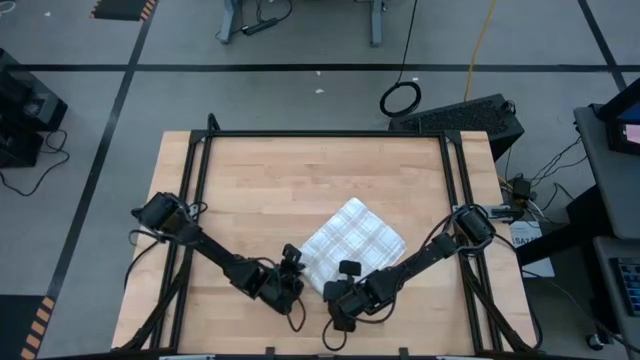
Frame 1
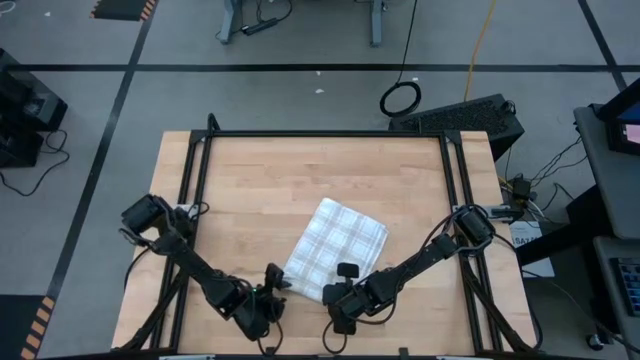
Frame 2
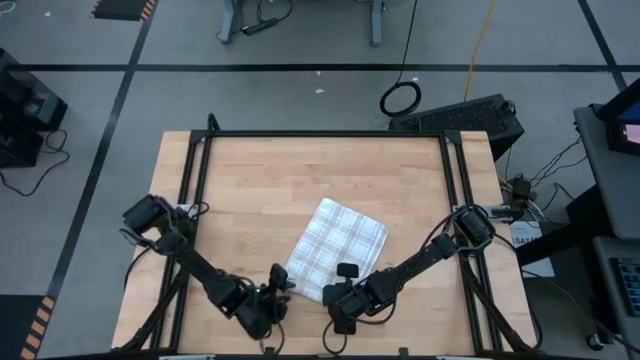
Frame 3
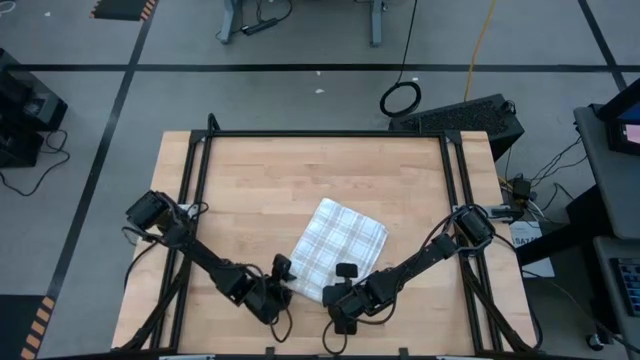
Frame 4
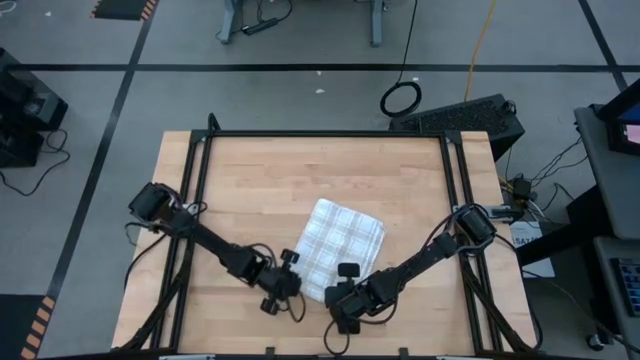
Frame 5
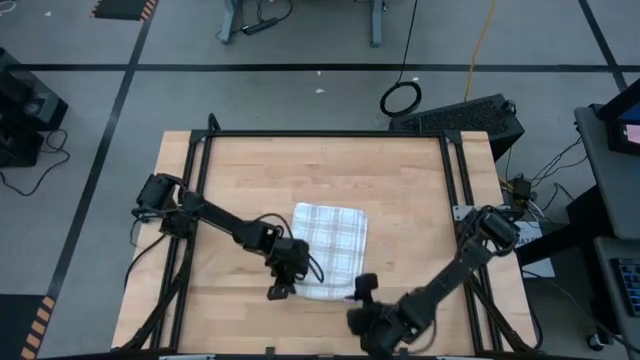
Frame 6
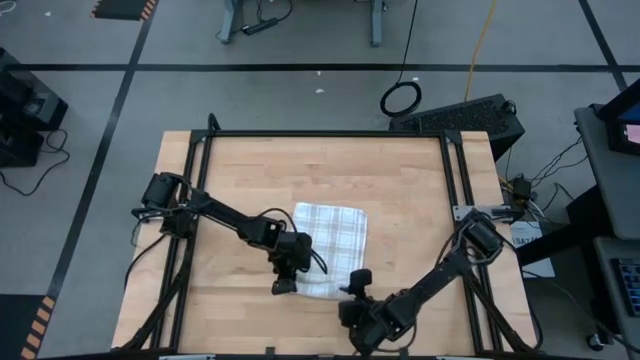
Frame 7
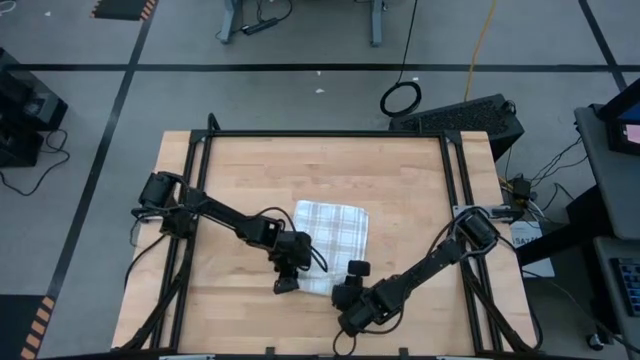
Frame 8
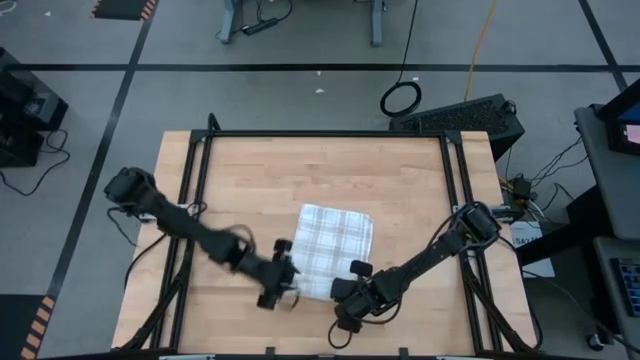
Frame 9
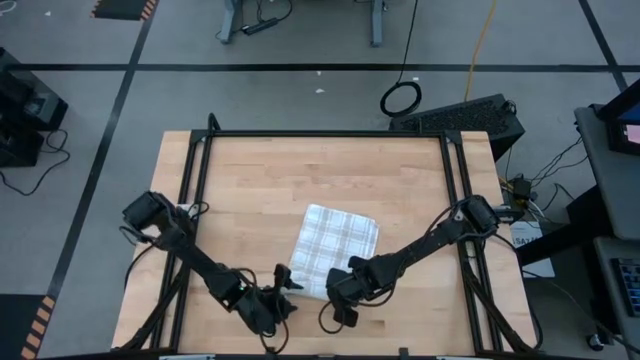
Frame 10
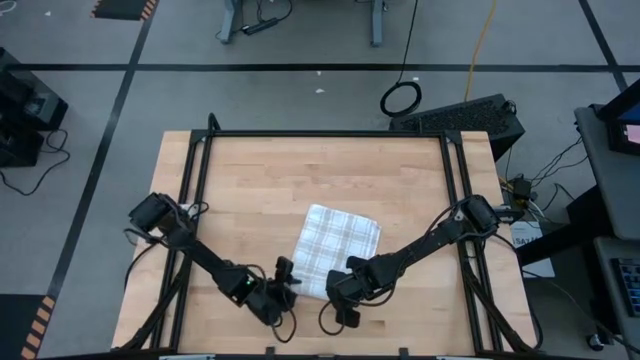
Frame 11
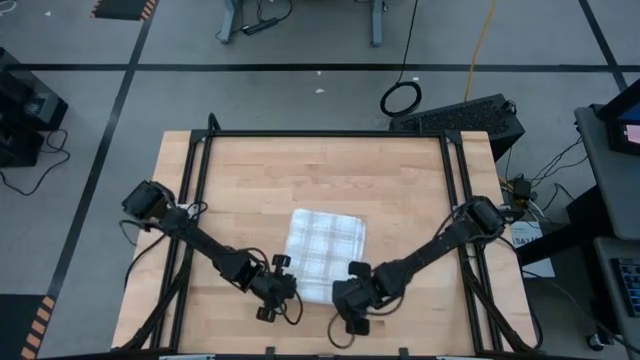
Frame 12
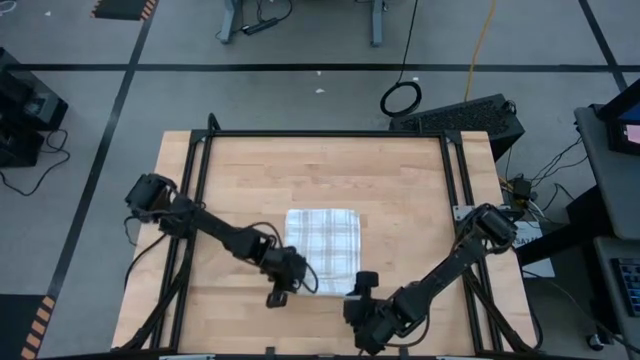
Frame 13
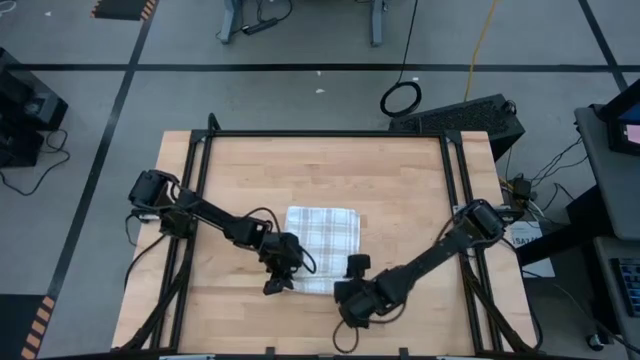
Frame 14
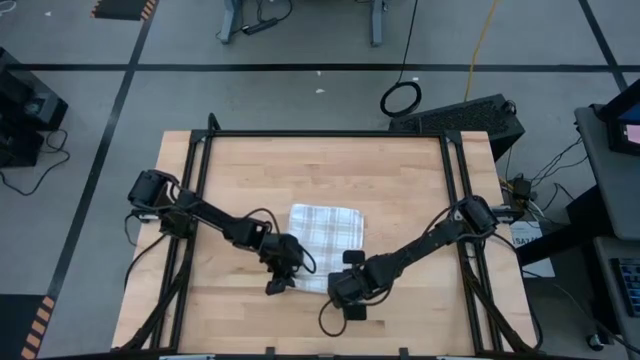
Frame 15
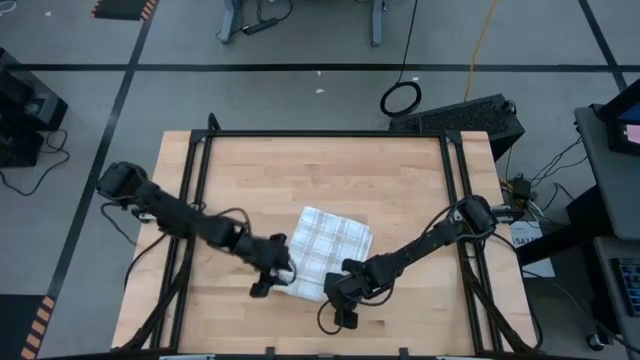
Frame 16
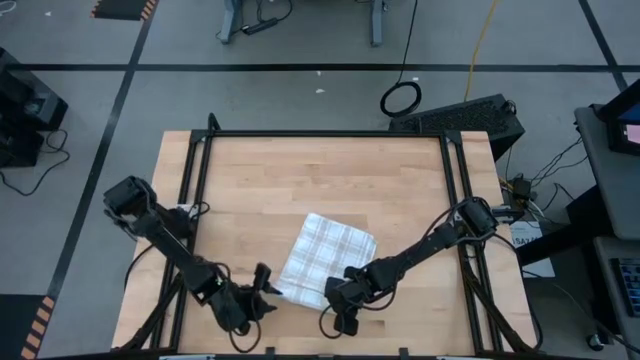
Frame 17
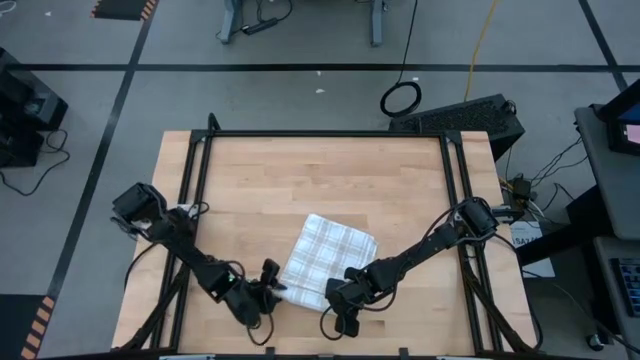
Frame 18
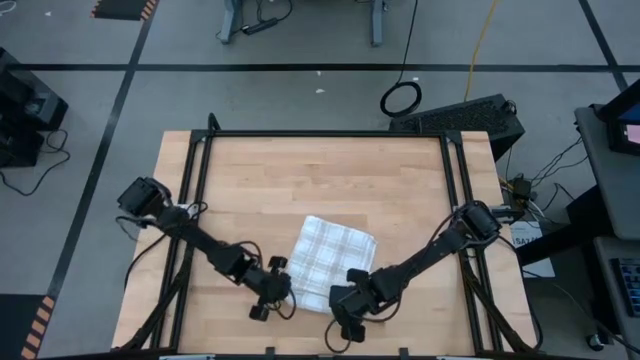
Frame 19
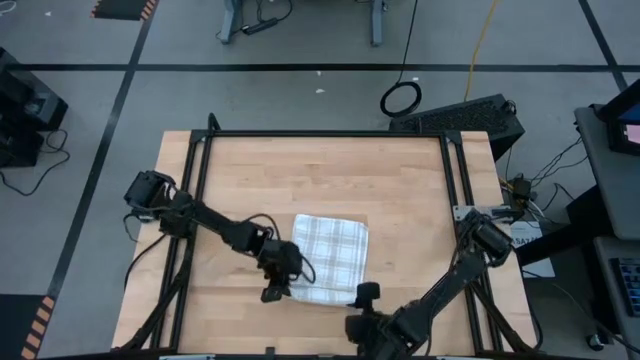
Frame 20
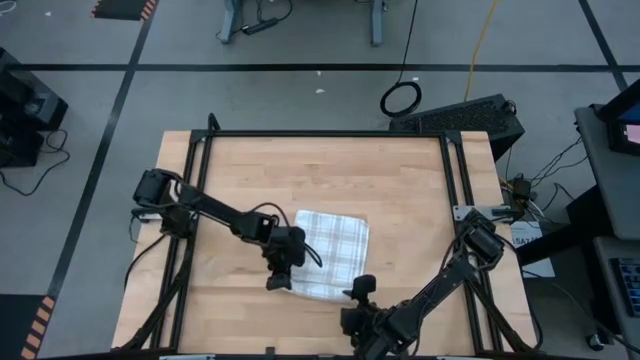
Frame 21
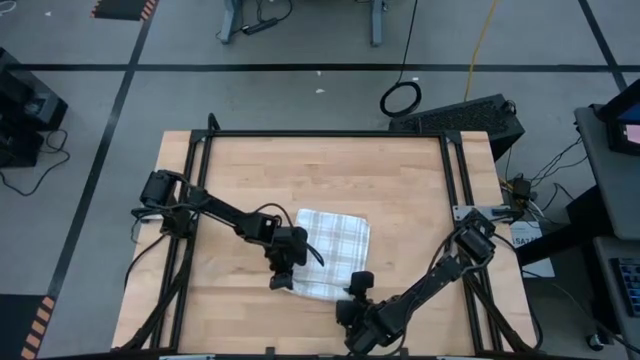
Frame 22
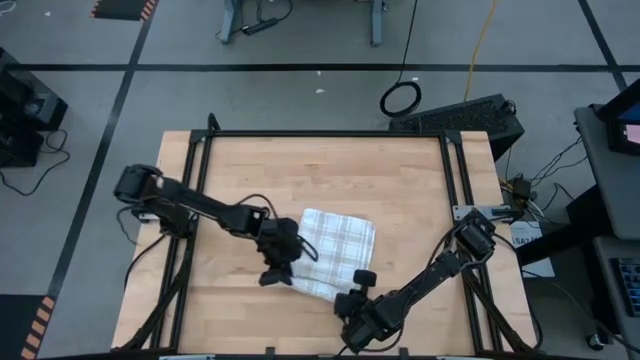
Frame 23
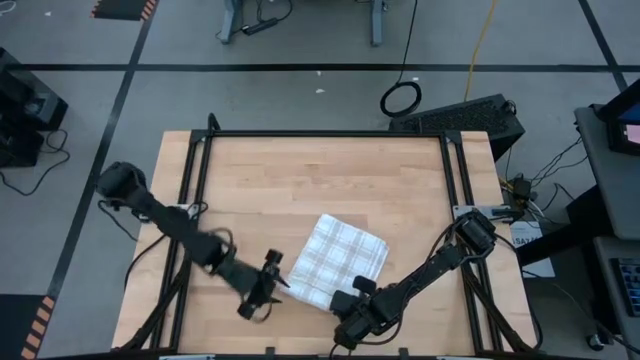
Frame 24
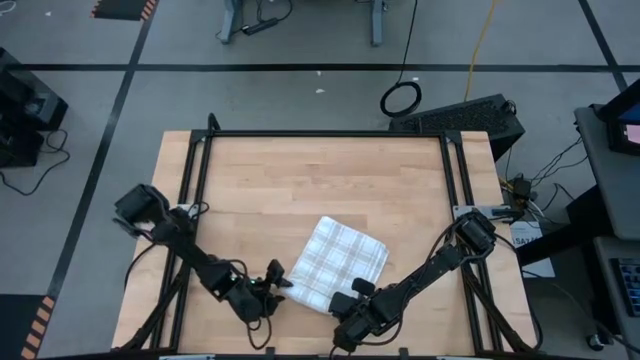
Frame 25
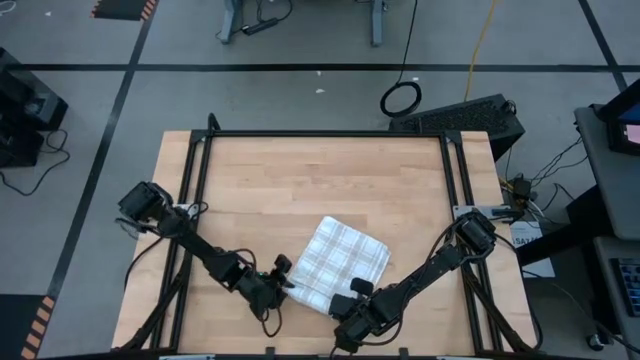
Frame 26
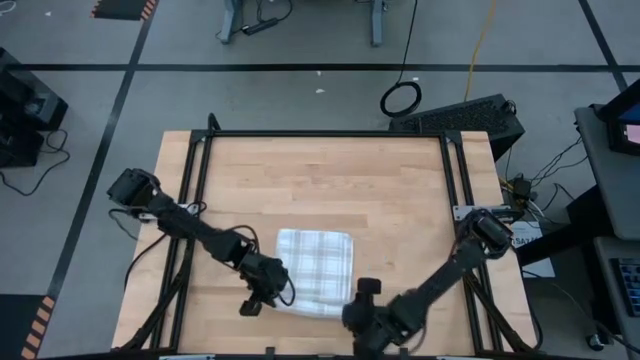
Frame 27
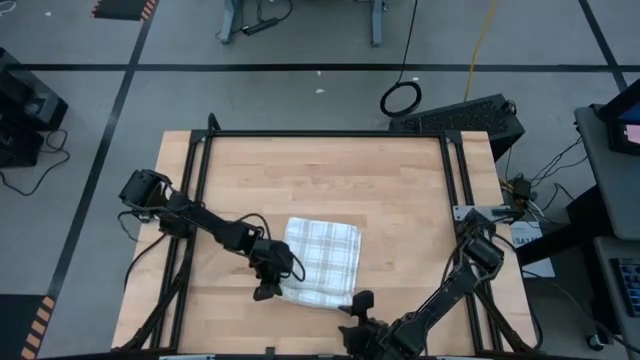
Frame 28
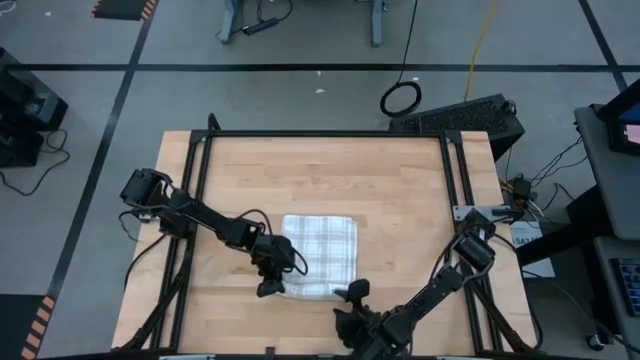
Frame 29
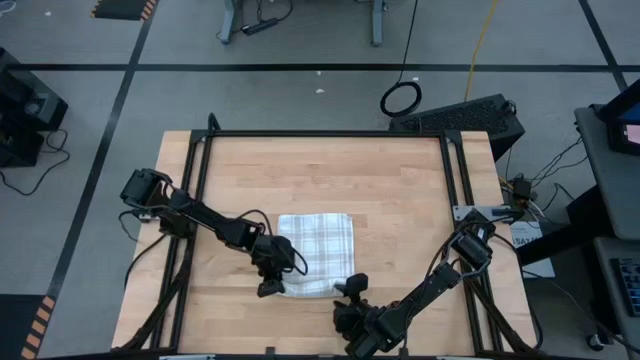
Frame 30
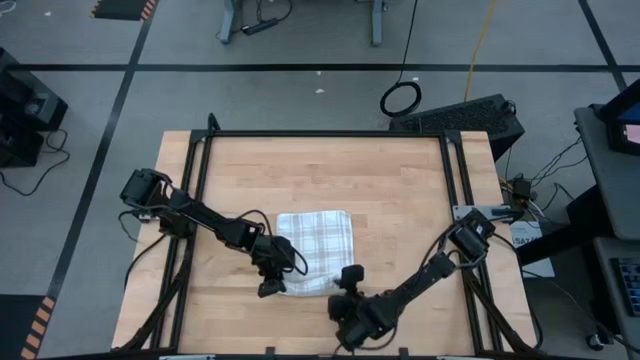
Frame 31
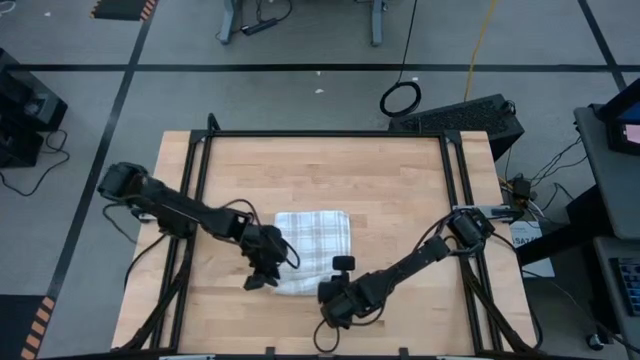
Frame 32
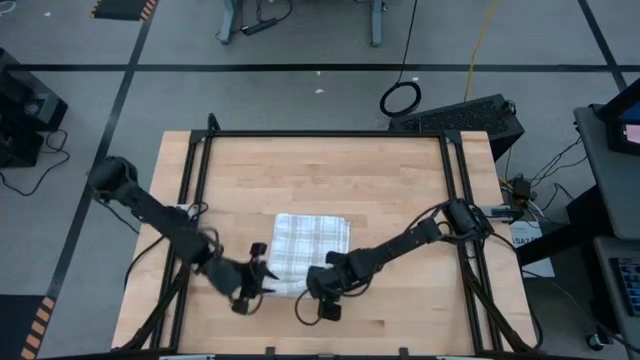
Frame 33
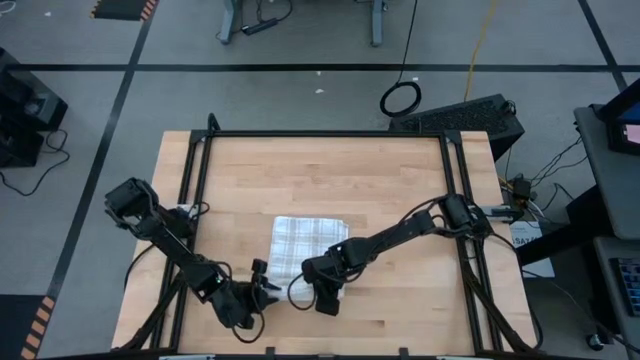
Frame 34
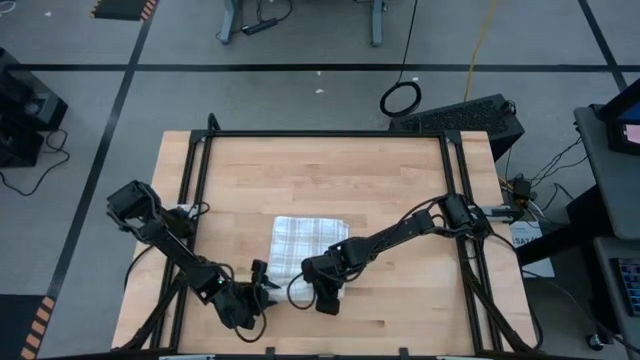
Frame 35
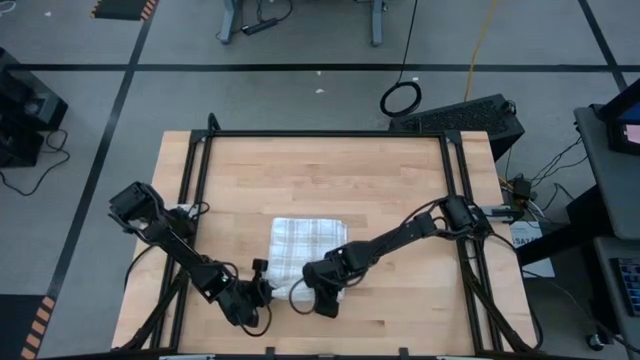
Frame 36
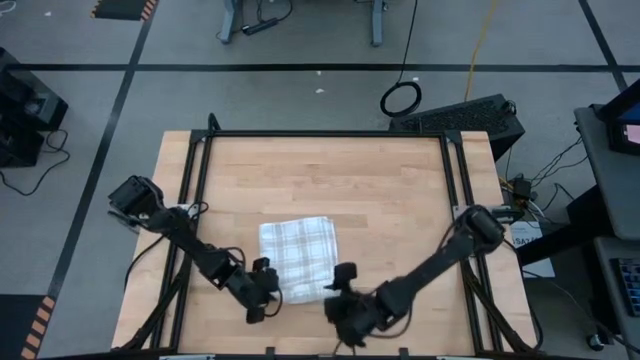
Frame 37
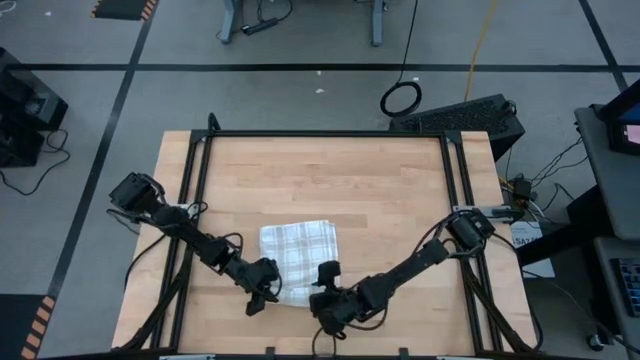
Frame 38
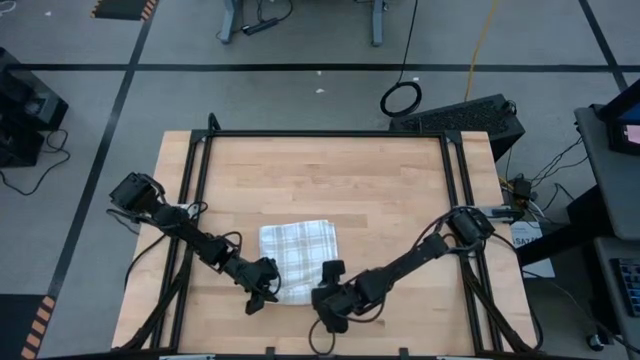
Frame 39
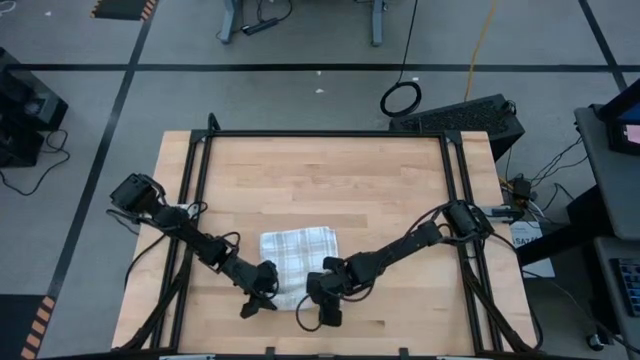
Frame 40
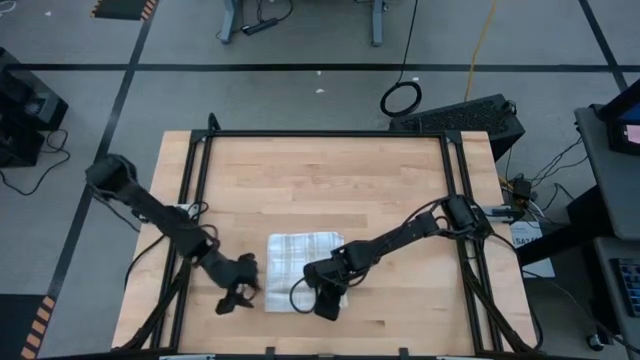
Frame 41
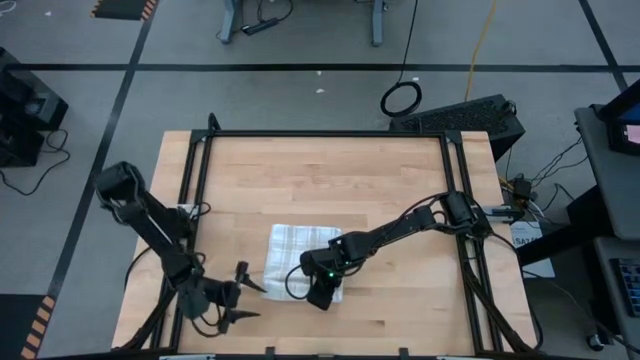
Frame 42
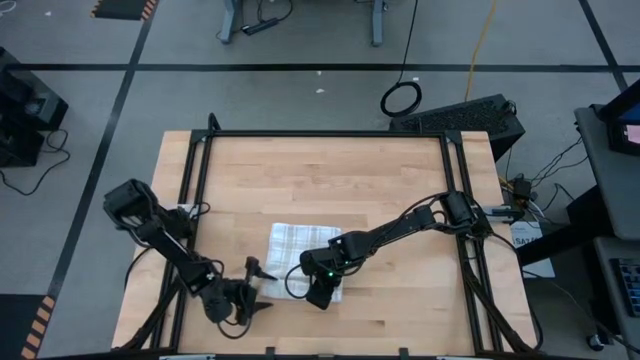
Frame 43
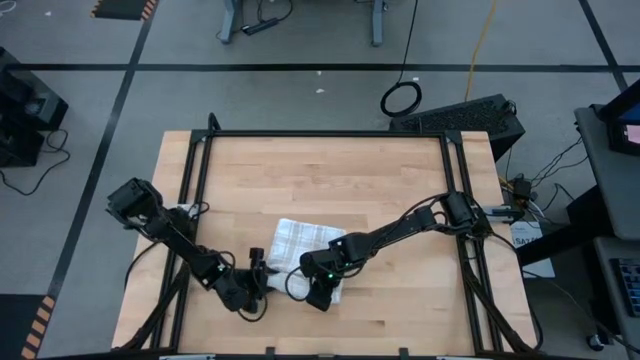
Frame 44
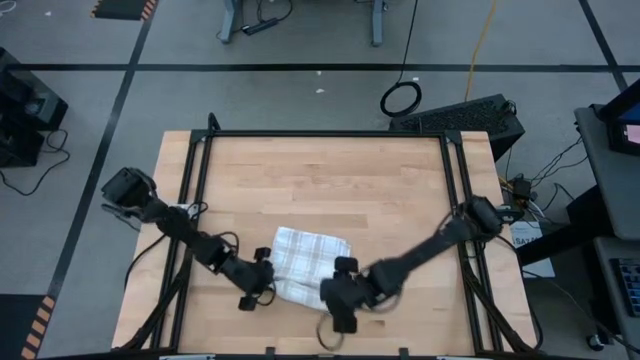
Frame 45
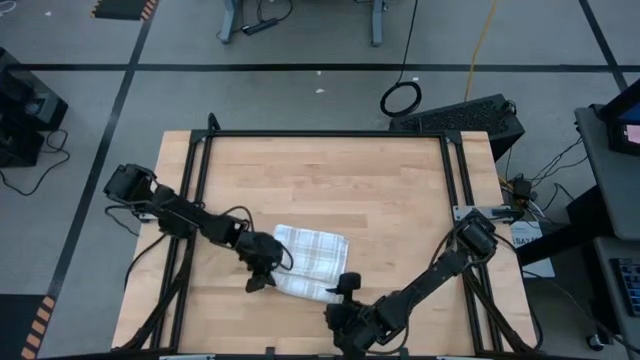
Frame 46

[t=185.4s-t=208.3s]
Task: Roll towel
Roll the towel
